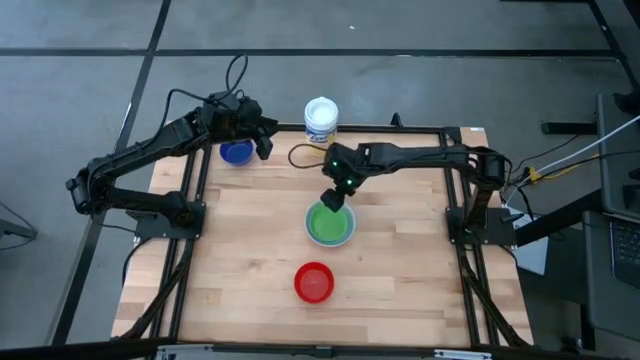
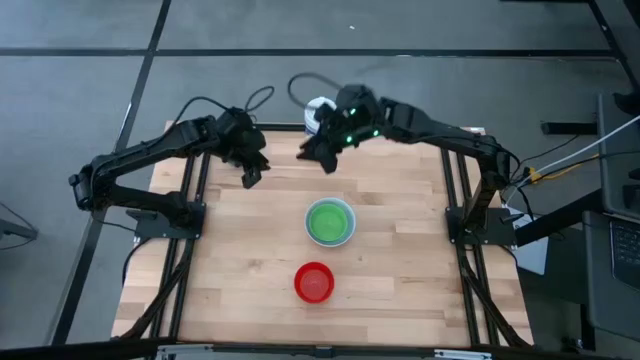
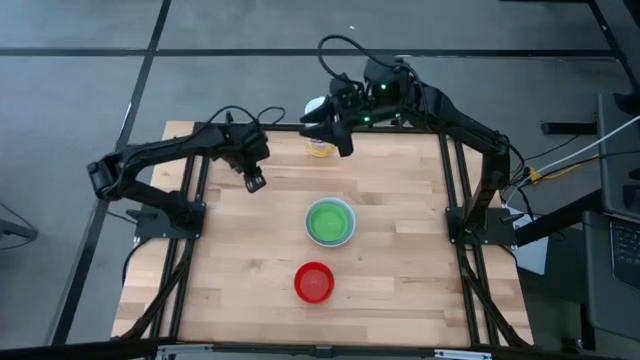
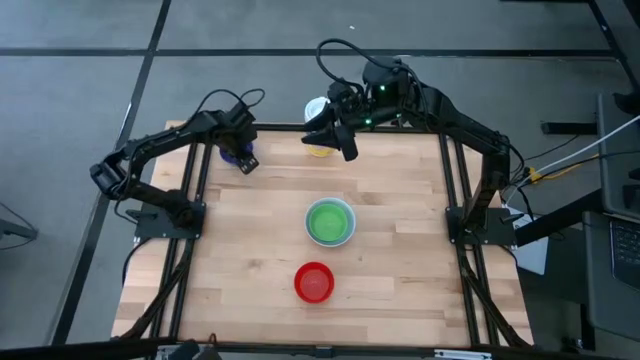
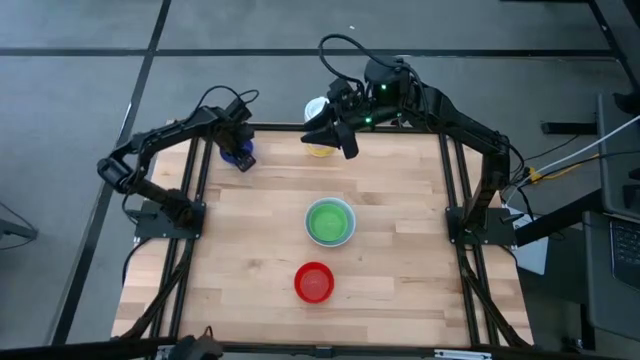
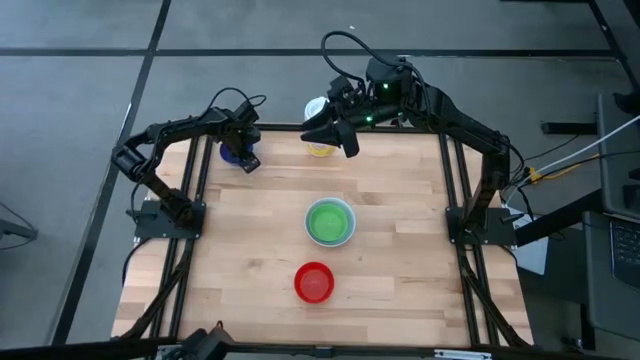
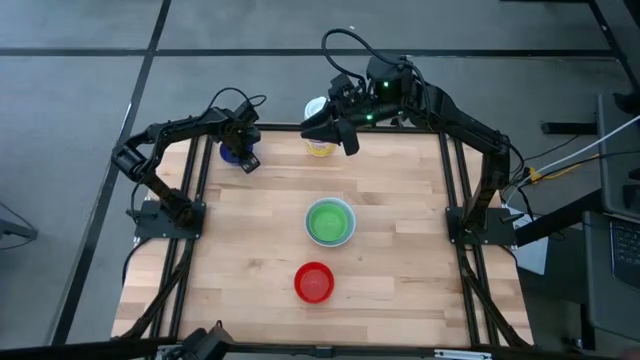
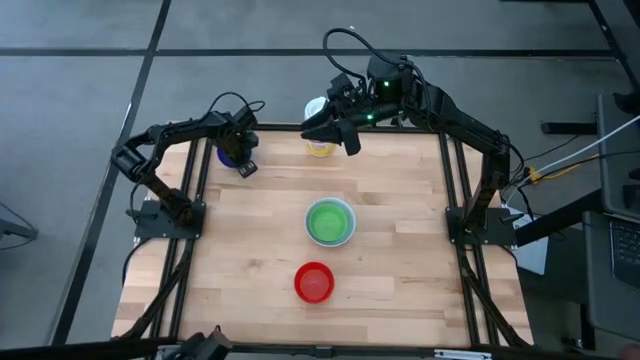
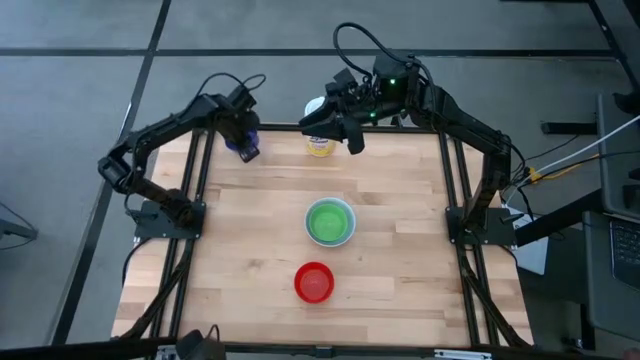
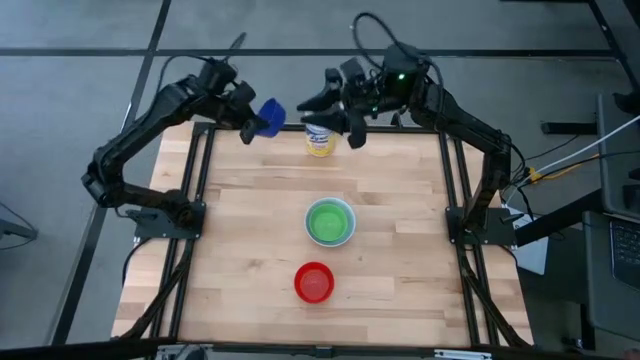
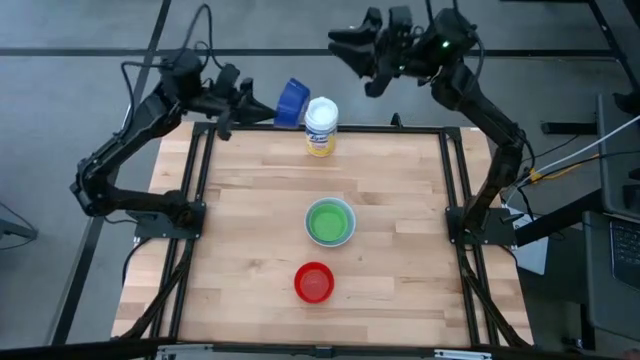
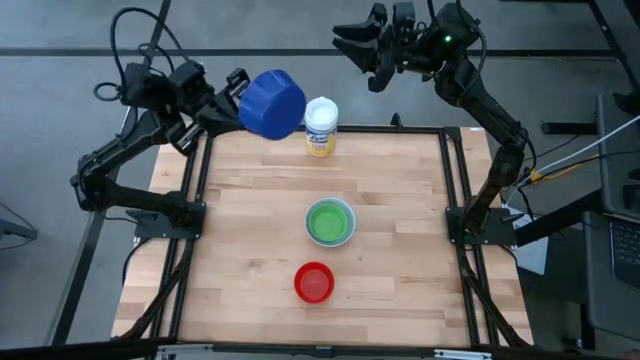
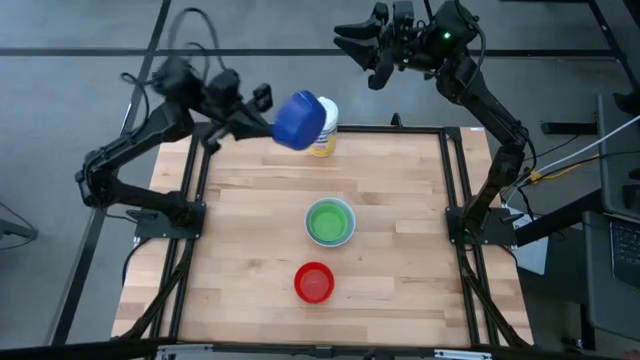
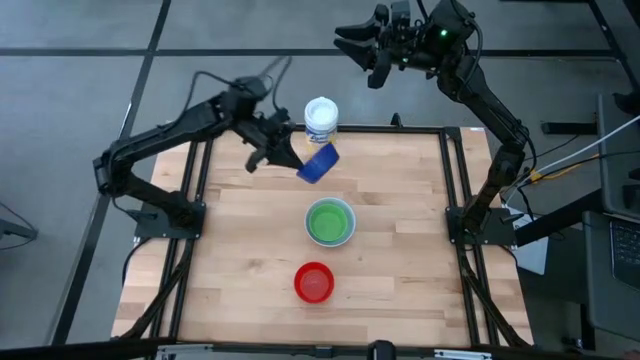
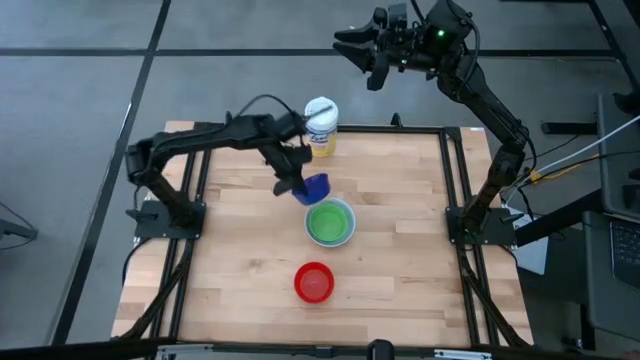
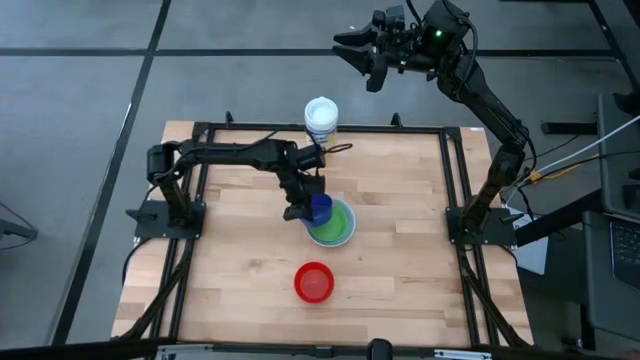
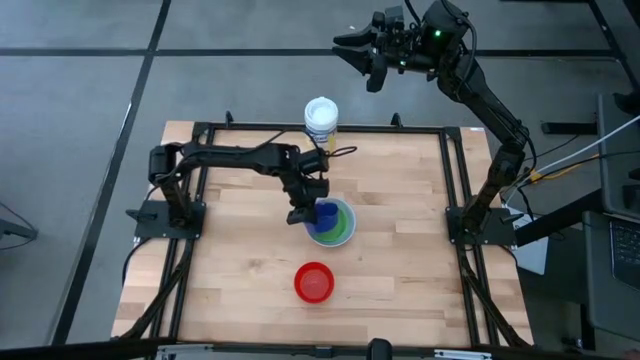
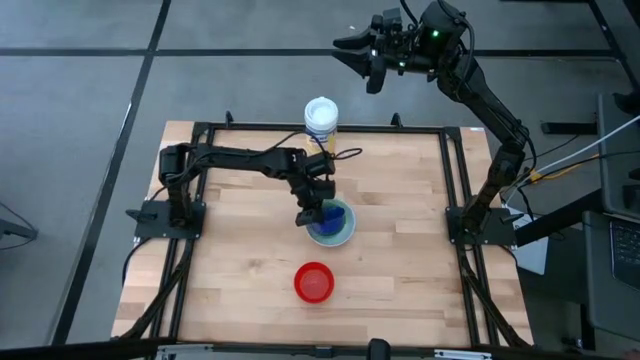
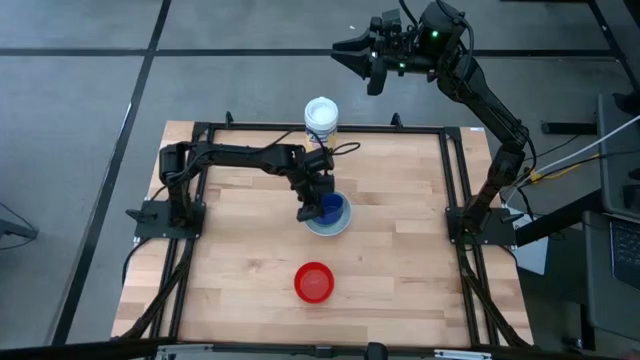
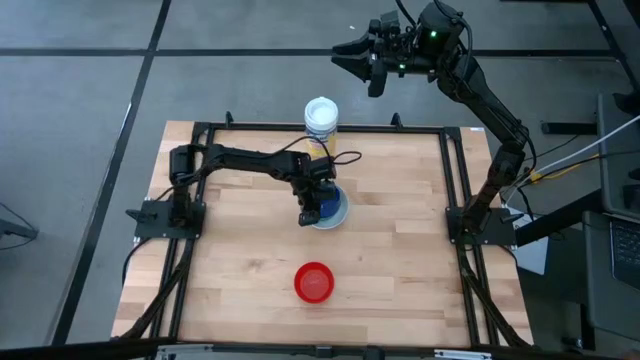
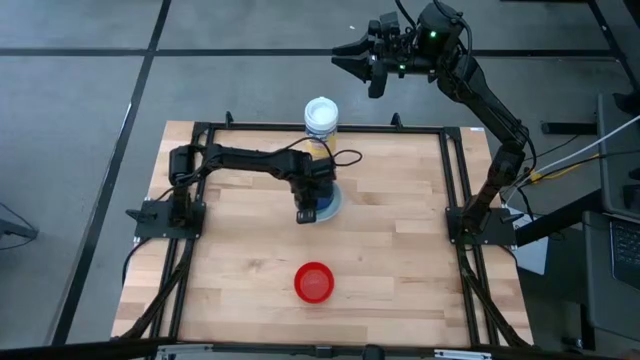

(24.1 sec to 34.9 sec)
Stack the blue bowl on top of the green bowl

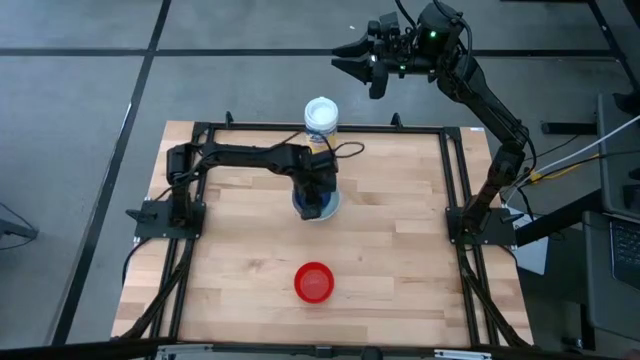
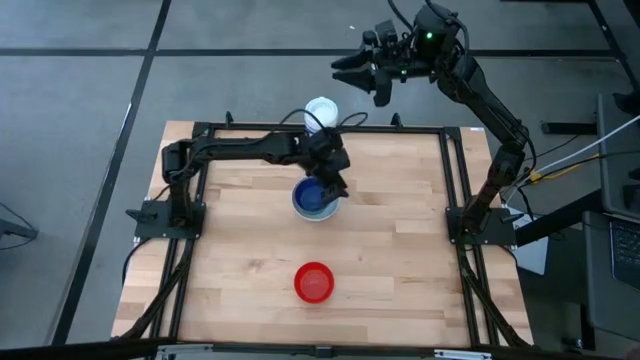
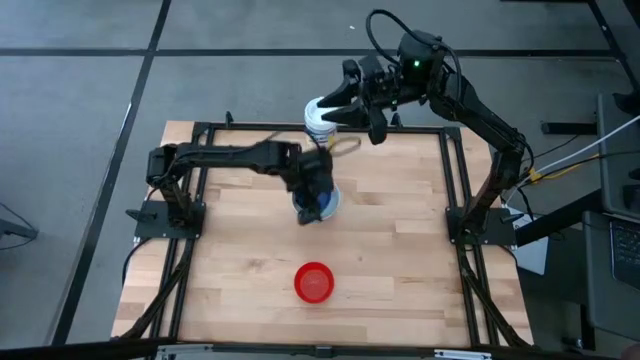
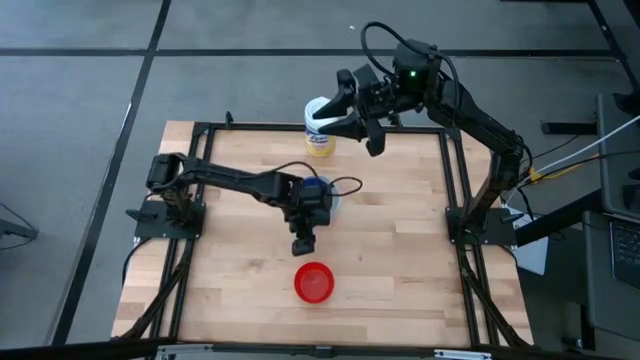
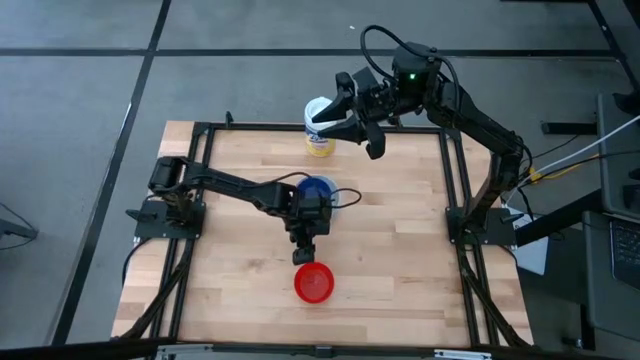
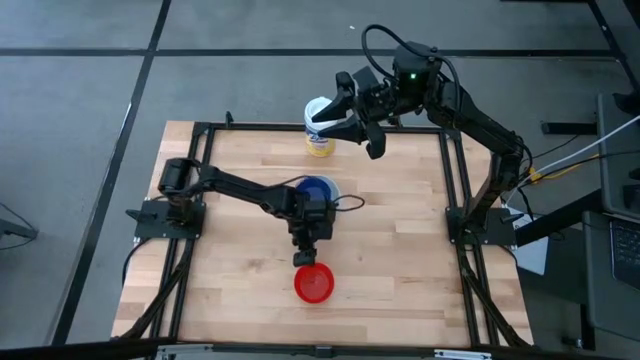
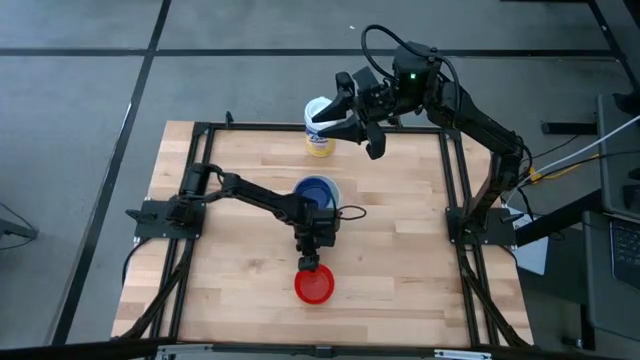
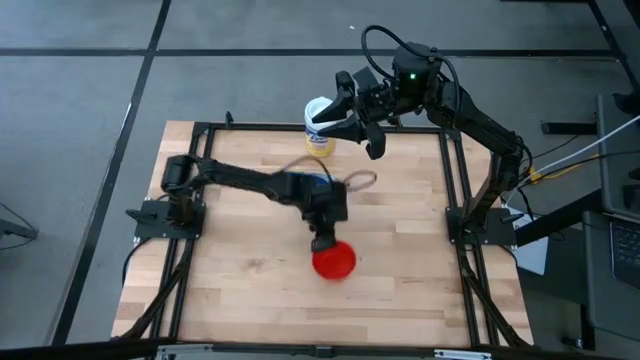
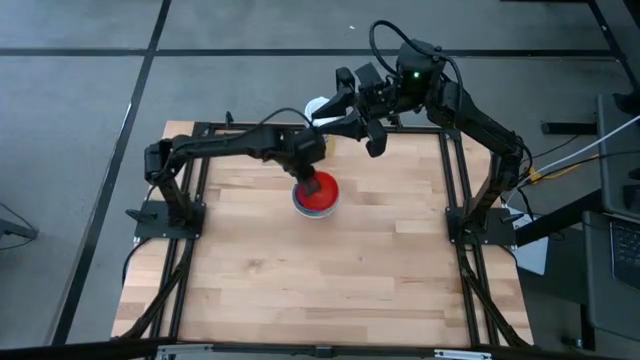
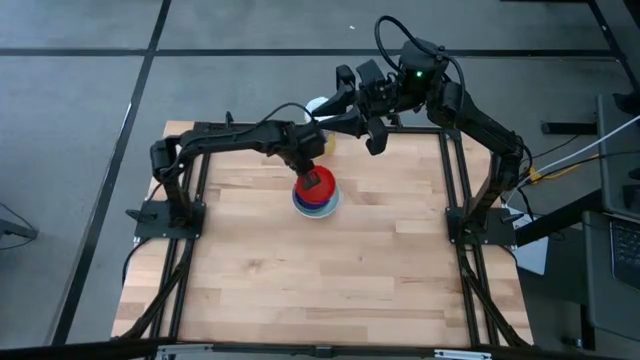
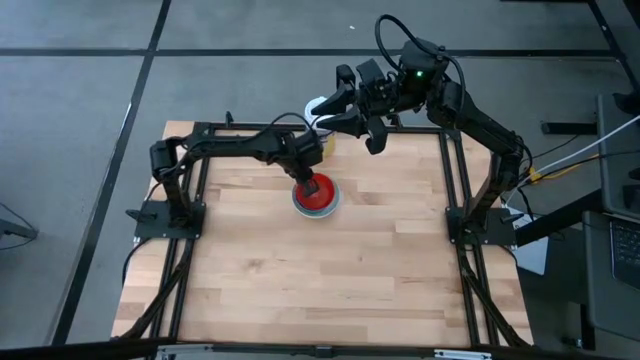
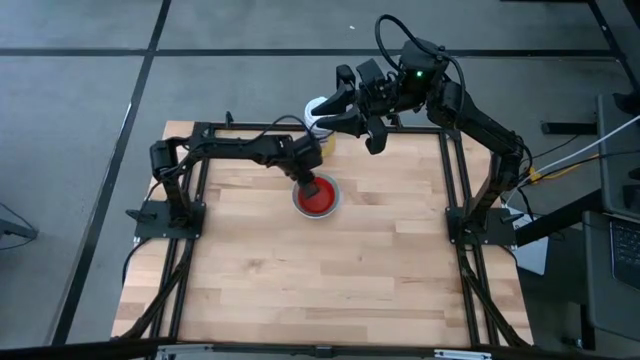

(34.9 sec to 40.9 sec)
Stack the red bowl on top of the blue bowl

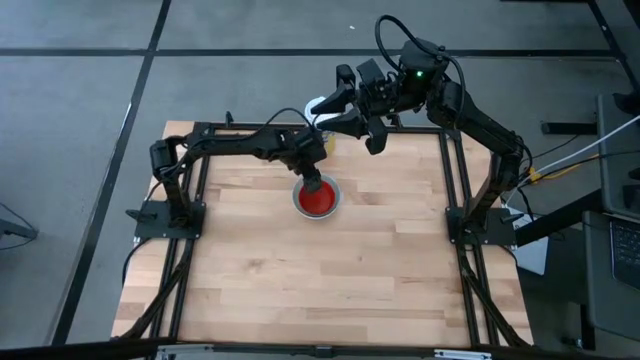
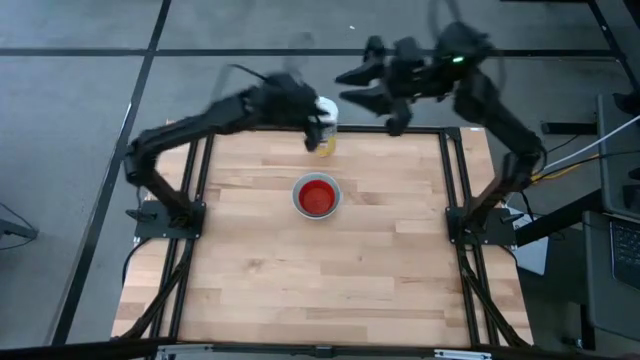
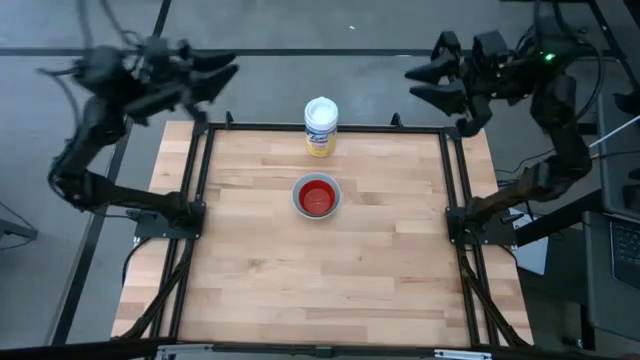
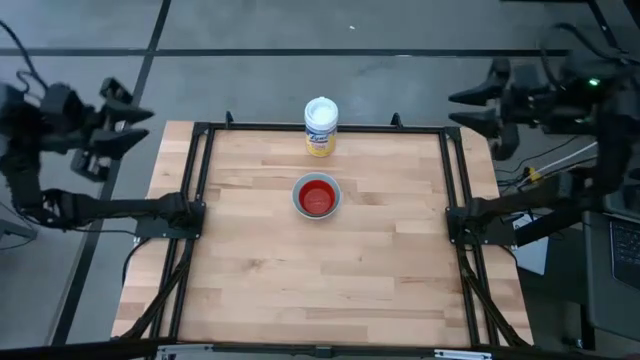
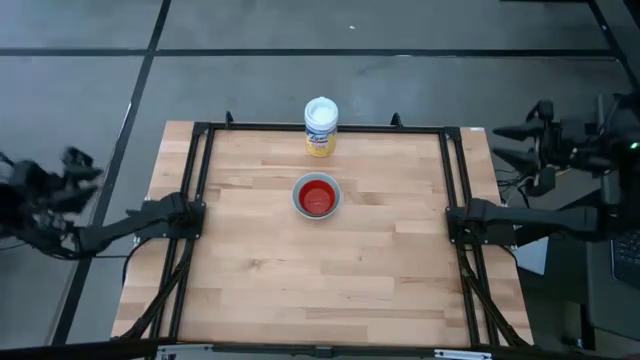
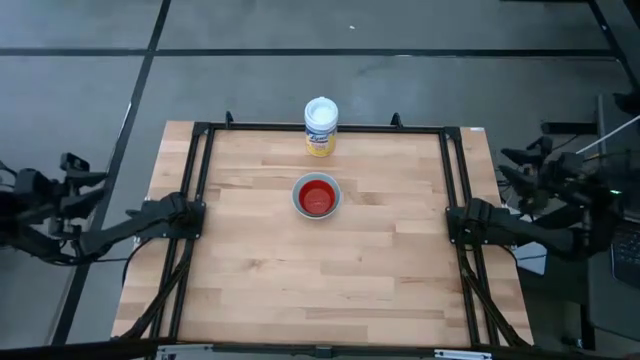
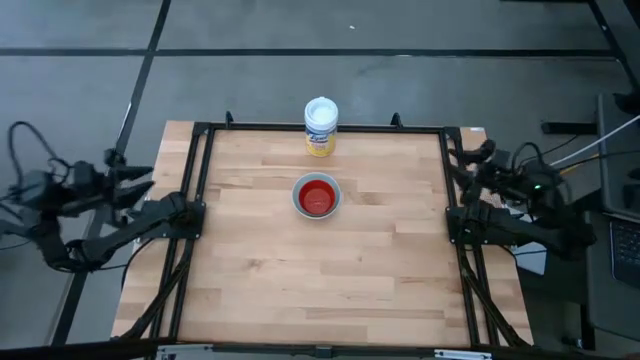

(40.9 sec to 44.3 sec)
Return to Home Position
